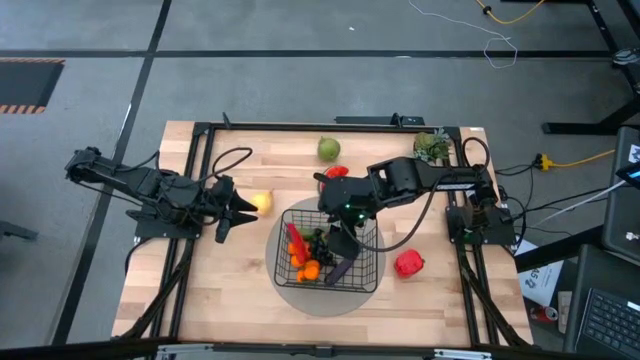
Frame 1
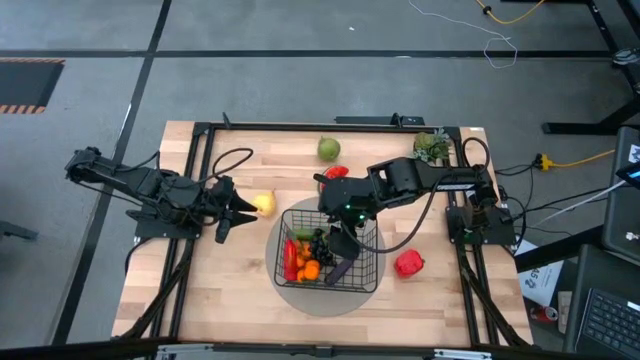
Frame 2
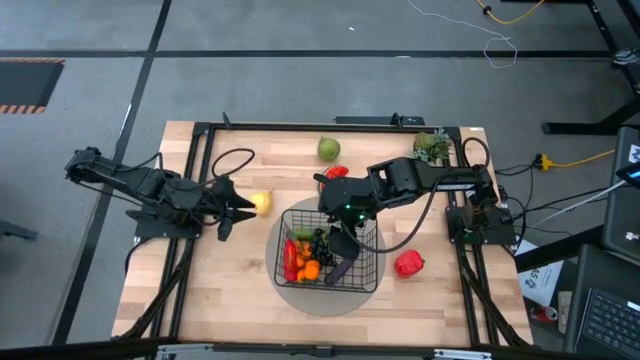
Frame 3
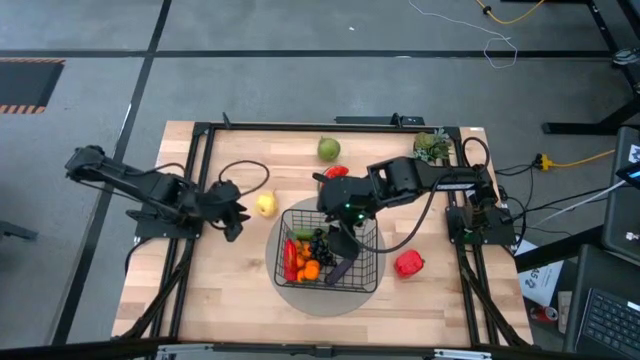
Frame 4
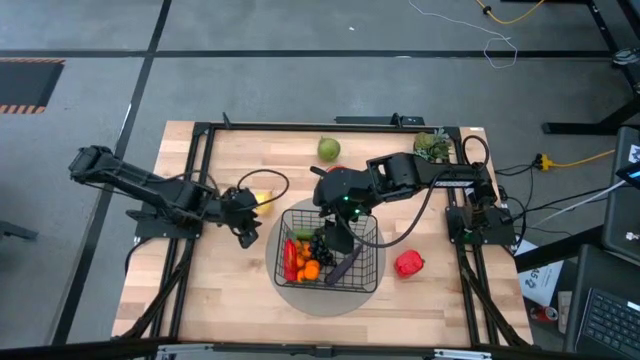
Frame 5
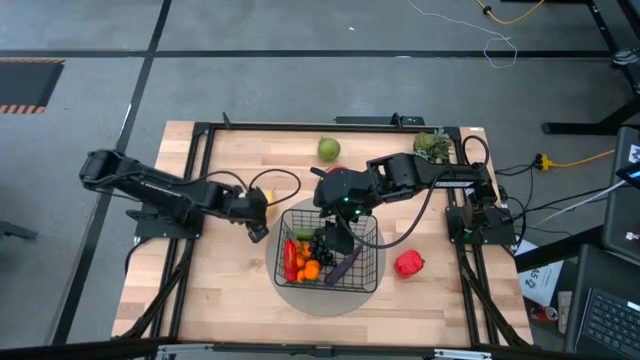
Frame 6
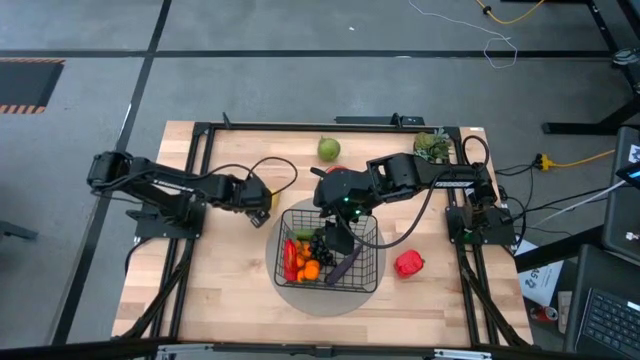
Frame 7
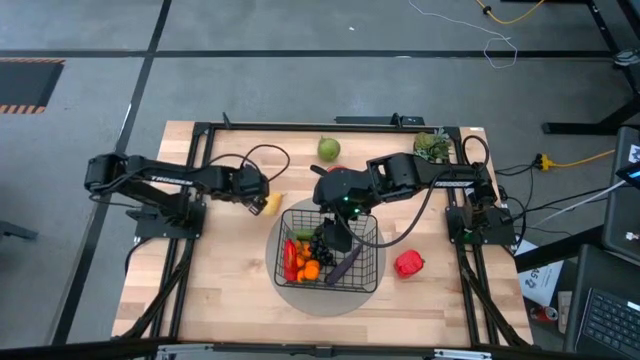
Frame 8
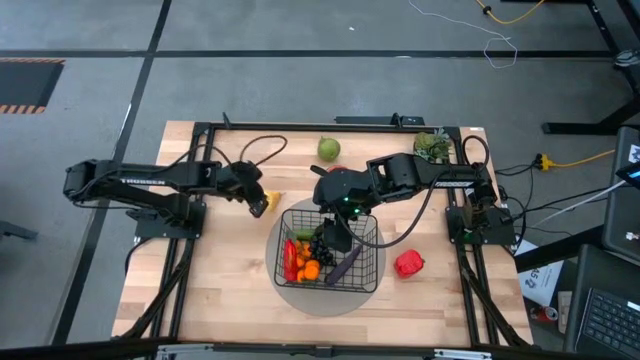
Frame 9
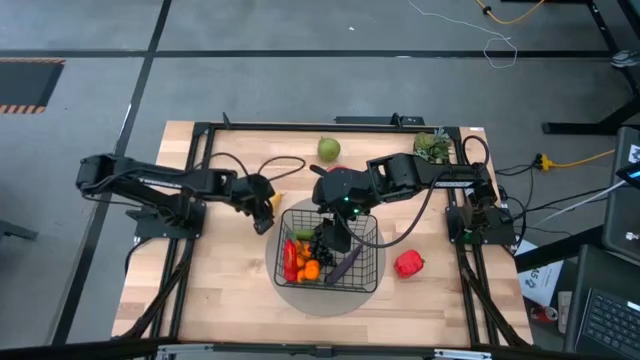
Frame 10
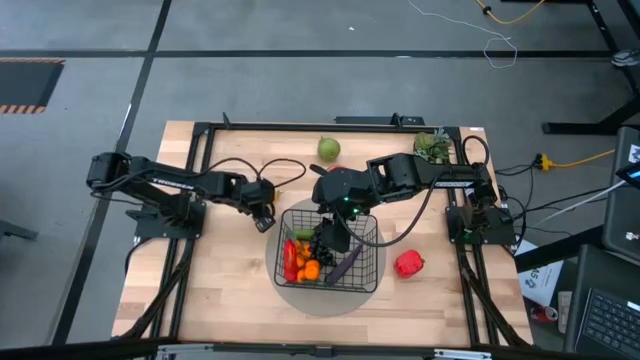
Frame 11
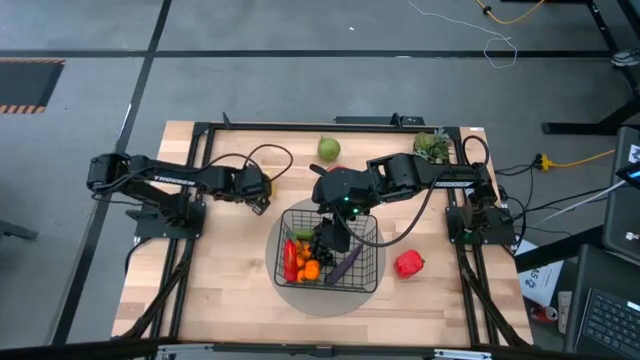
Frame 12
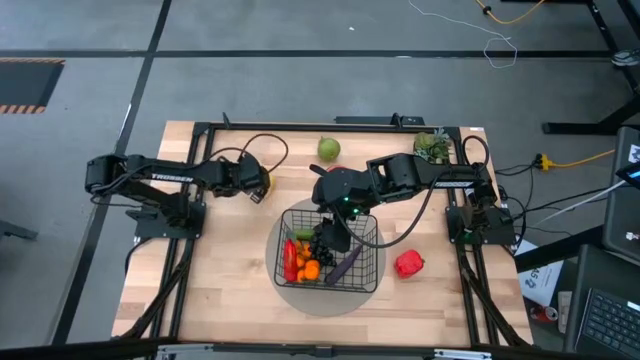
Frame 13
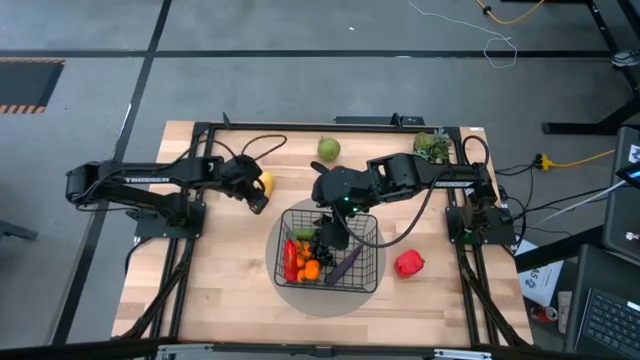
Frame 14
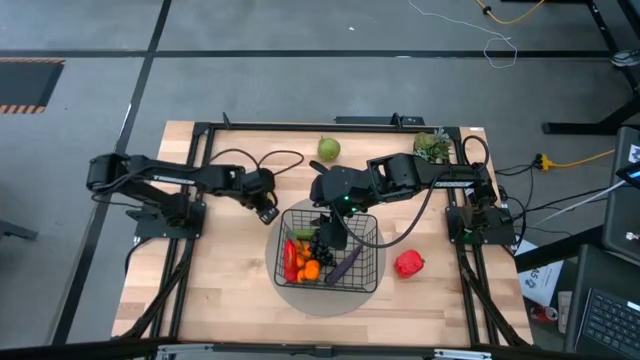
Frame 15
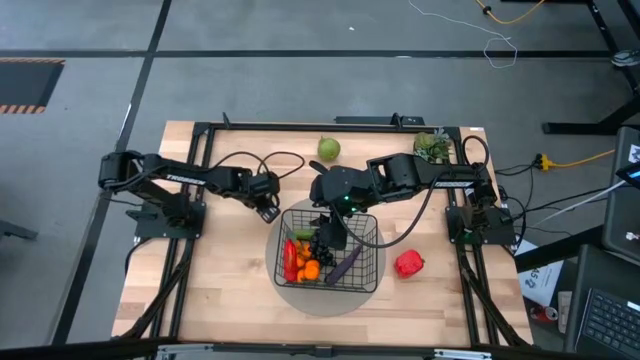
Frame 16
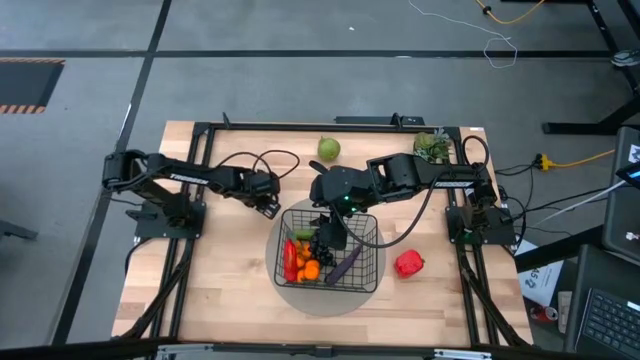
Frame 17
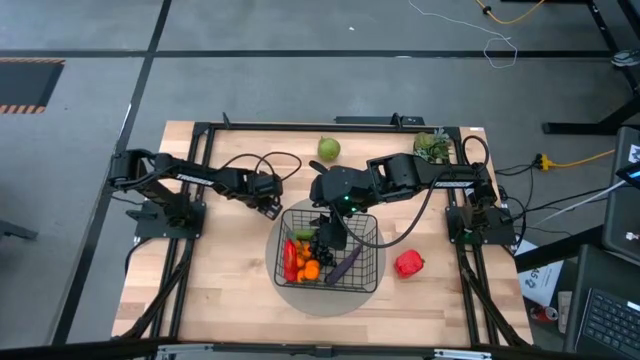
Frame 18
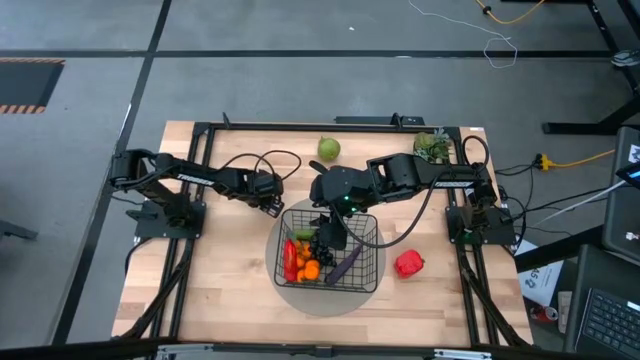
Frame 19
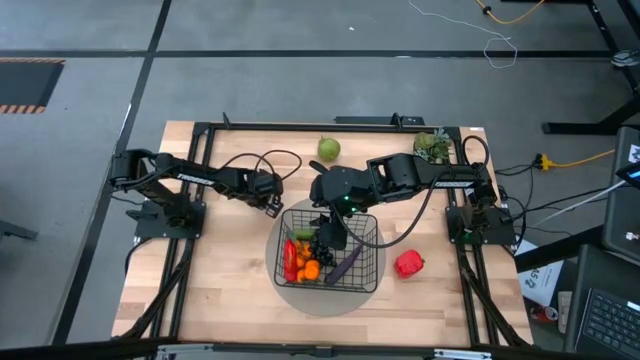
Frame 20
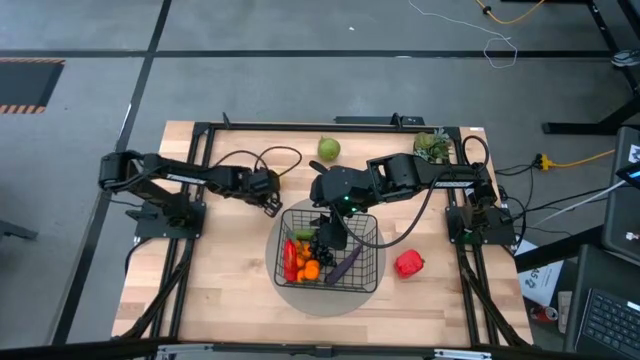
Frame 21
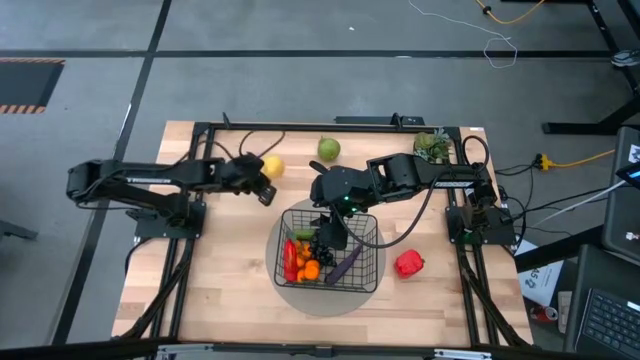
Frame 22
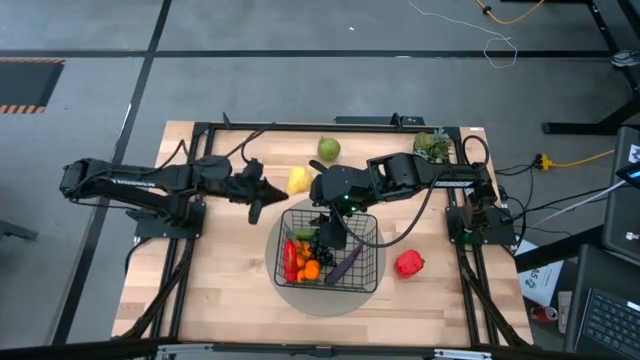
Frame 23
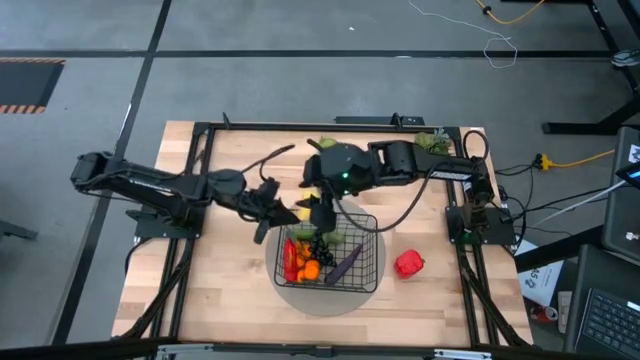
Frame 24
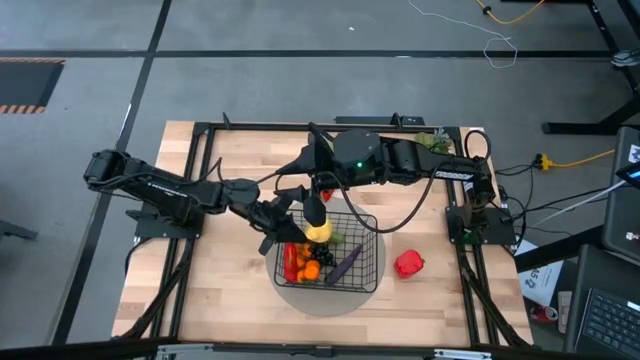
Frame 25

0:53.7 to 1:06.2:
Task: Build produce basket
Put the yellow pear into the black wire basket

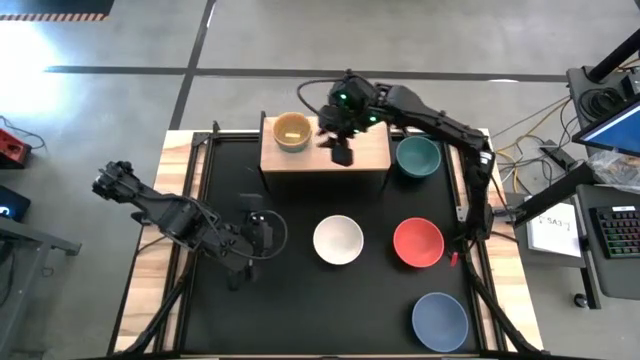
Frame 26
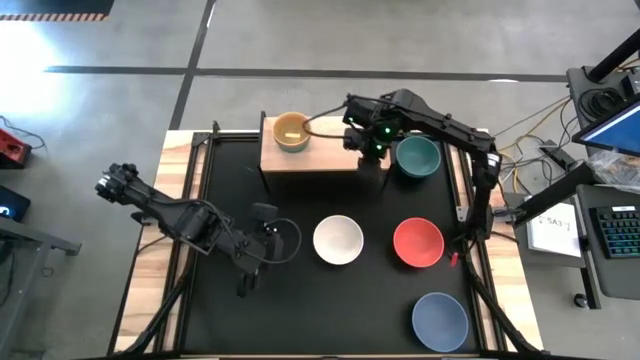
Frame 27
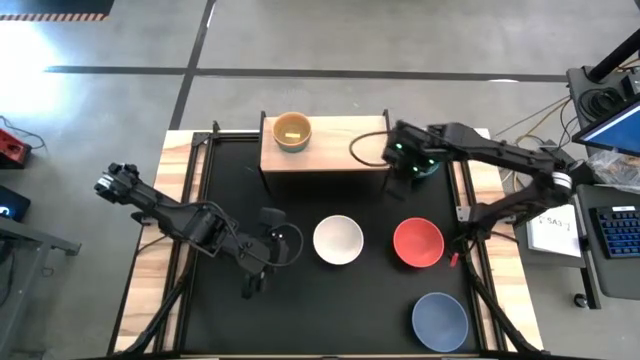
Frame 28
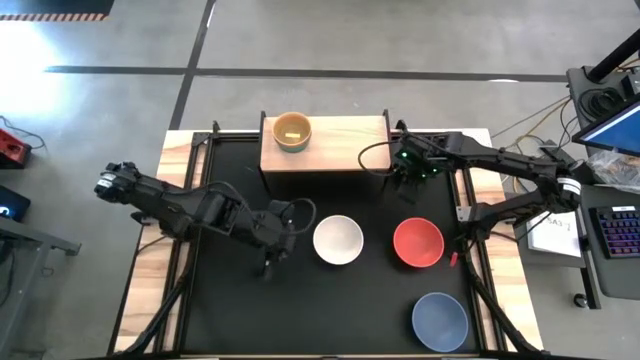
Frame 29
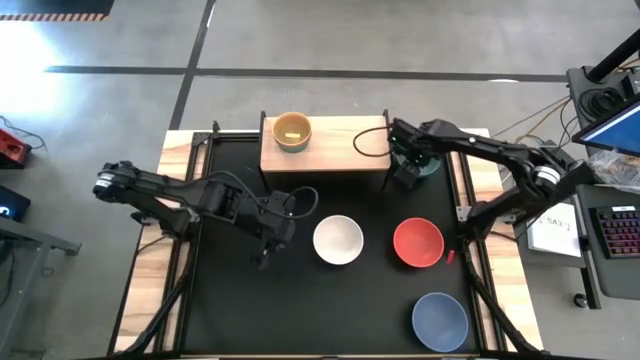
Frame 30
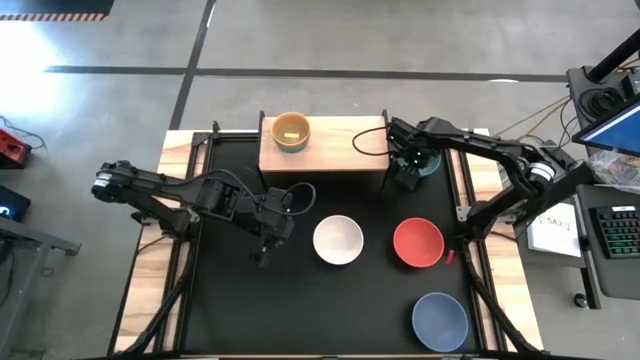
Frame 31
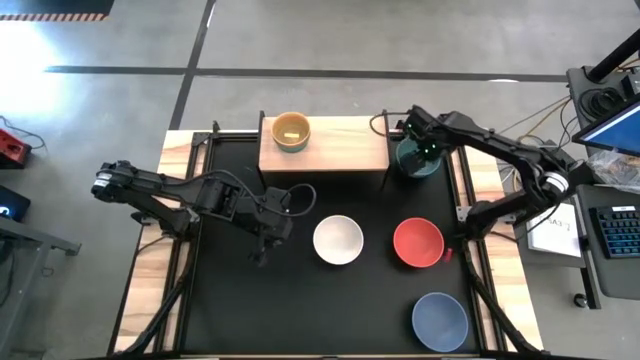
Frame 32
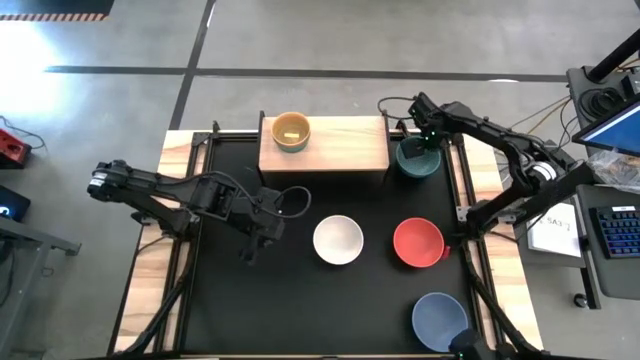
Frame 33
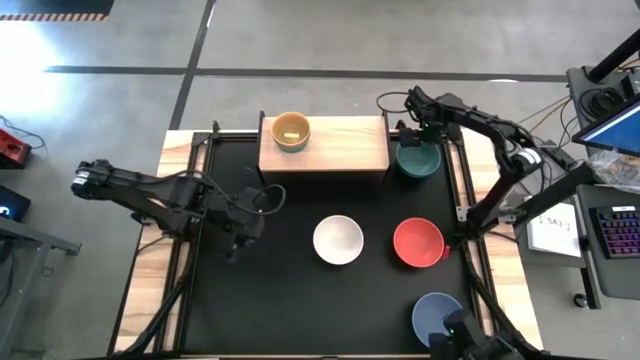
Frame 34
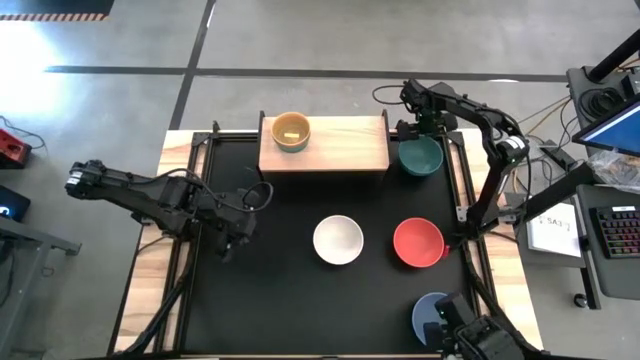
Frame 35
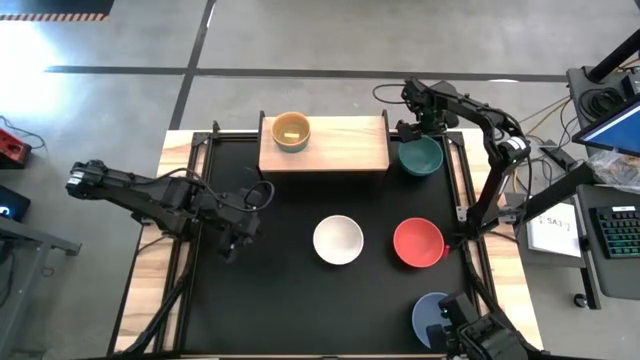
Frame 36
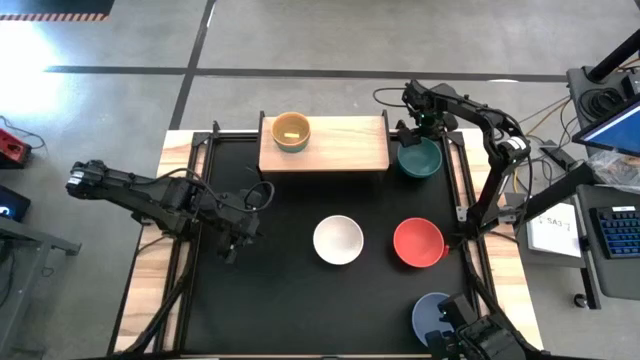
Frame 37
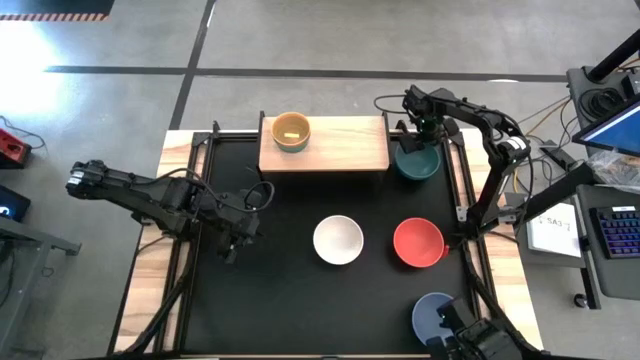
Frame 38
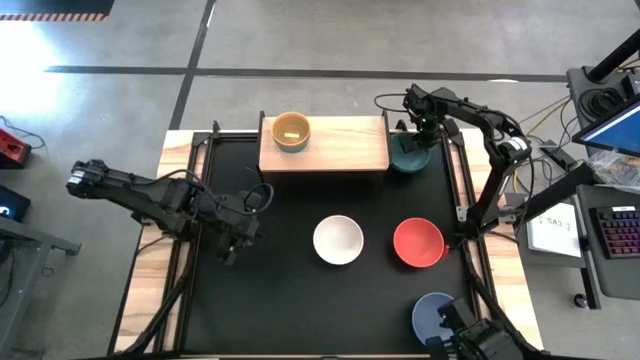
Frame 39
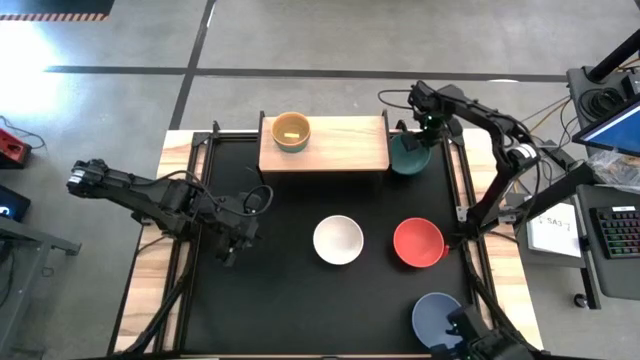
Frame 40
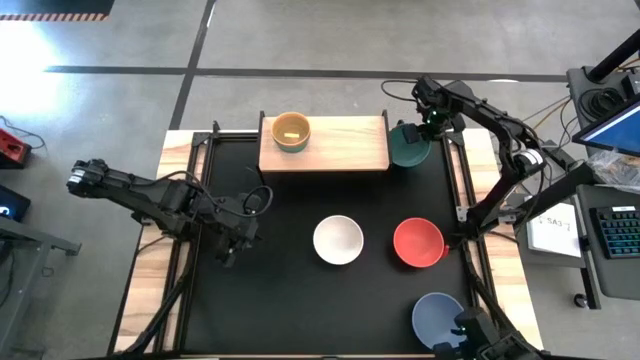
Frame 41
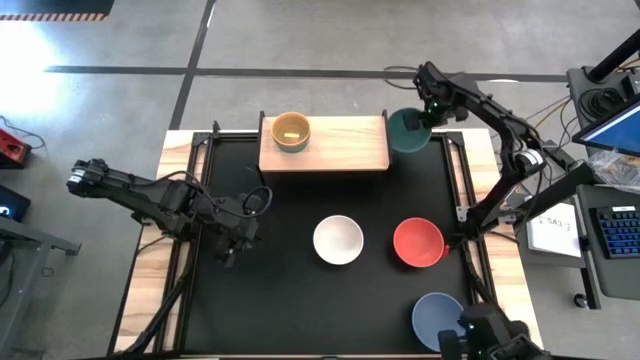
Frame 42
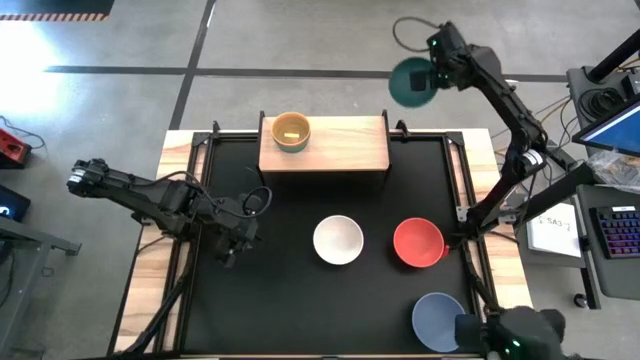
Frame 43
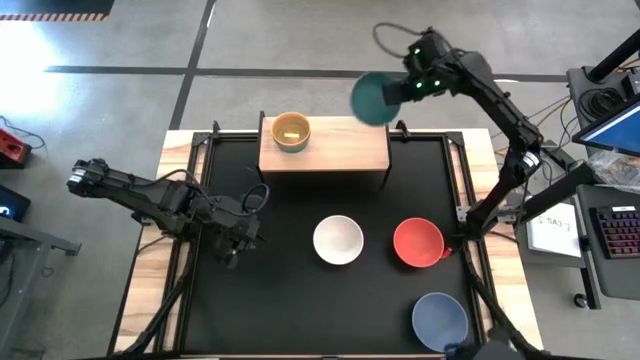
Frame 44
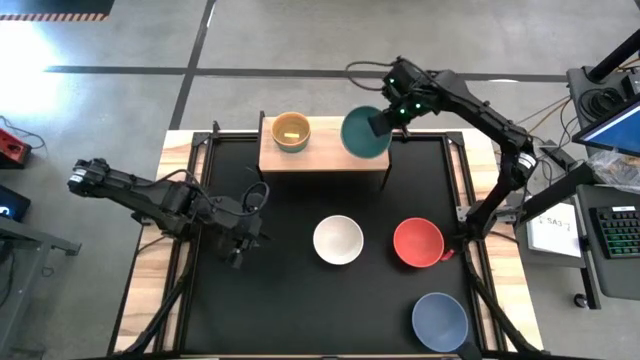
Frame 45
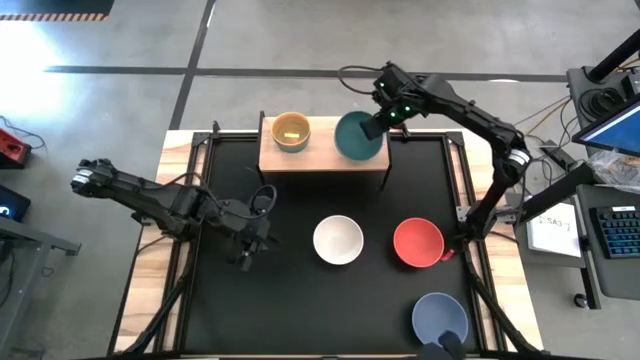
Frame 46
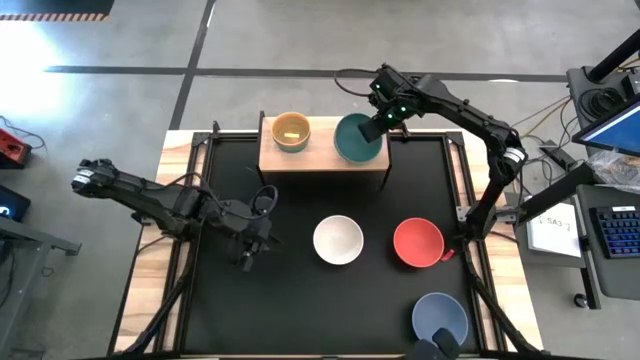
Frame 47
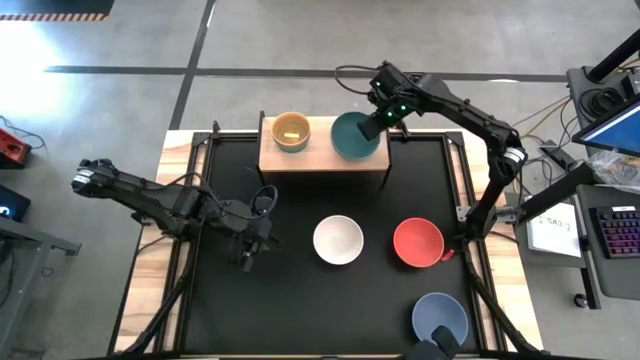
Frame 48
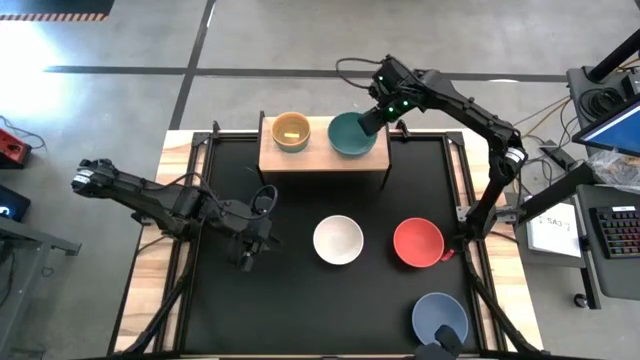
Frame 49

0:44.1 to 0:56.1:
Task: Place and stack bowls onto a shelf
Put the large green bowl on the shelf
